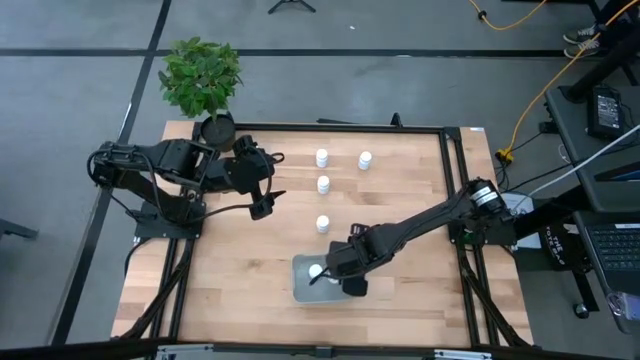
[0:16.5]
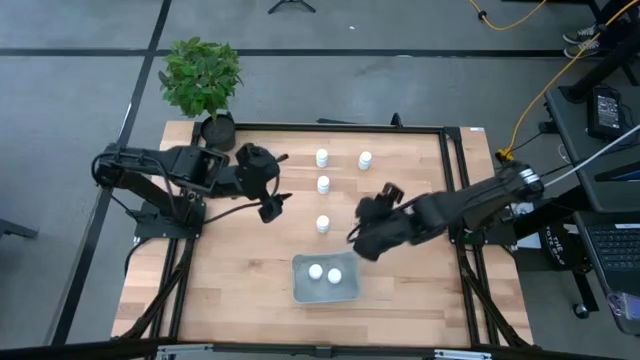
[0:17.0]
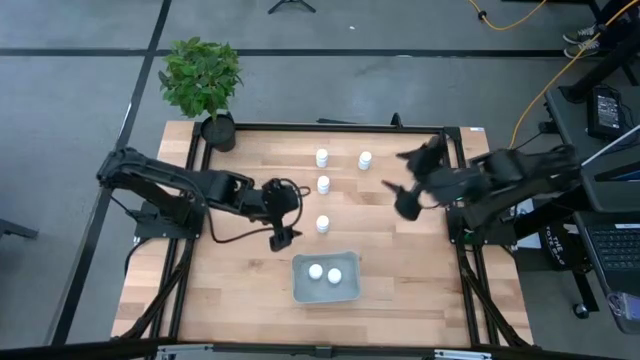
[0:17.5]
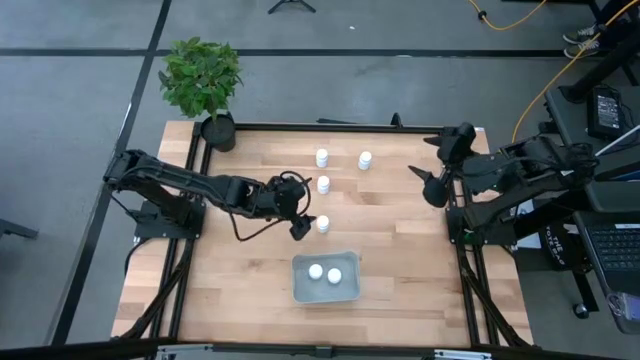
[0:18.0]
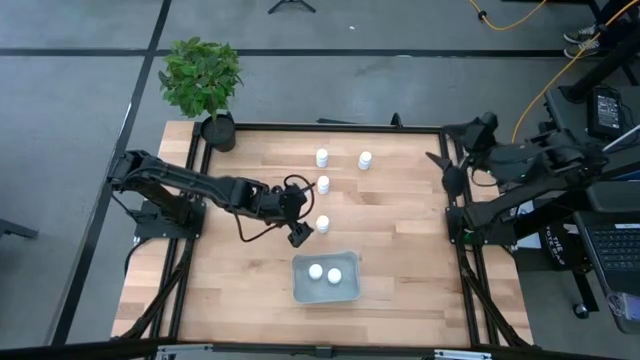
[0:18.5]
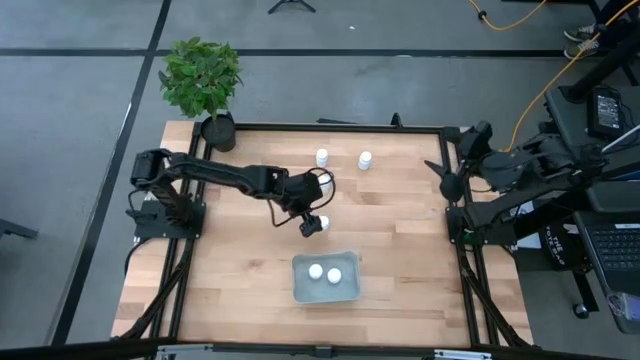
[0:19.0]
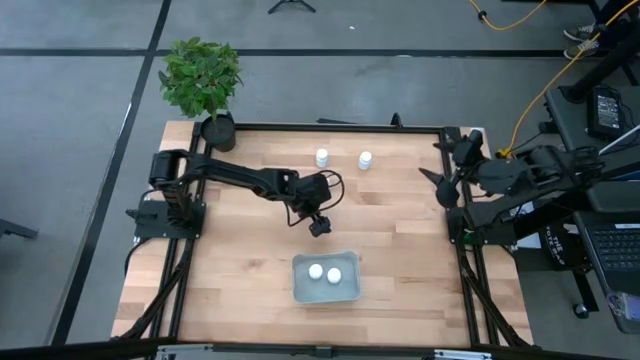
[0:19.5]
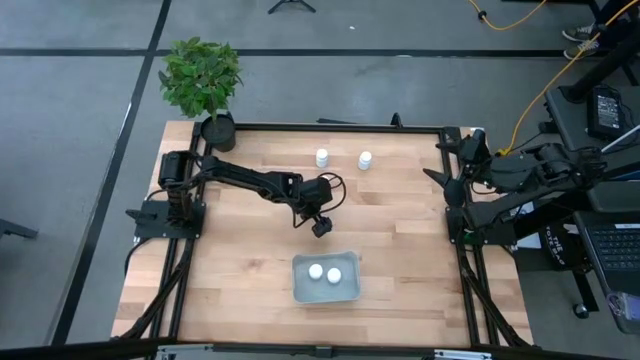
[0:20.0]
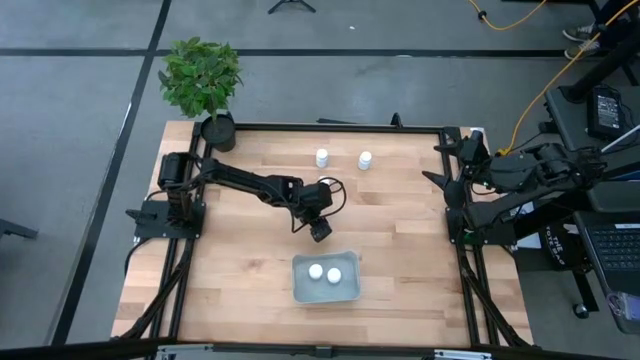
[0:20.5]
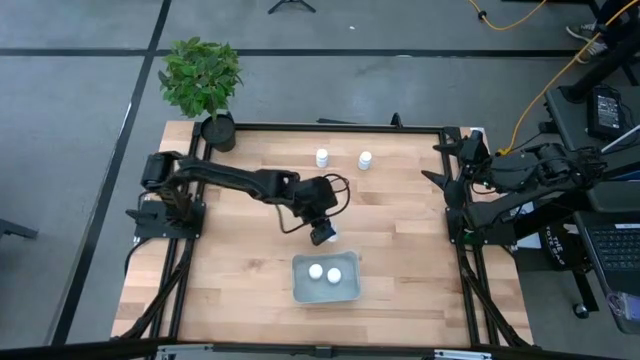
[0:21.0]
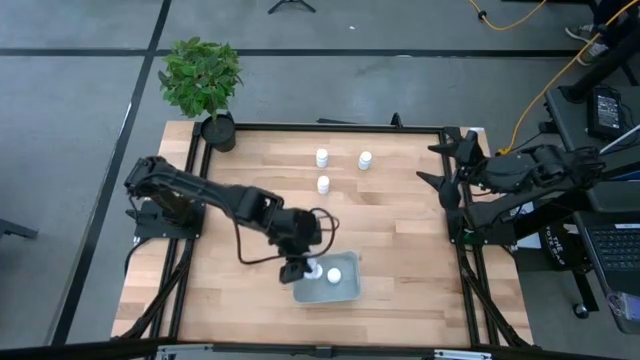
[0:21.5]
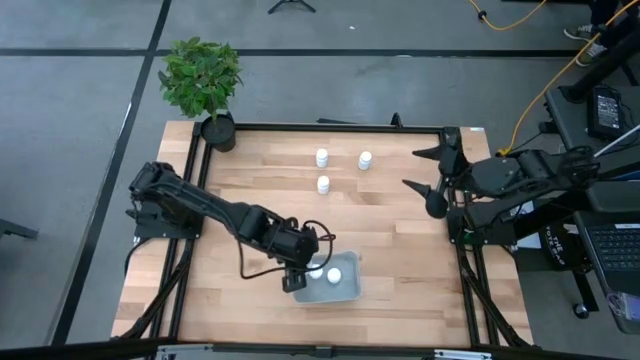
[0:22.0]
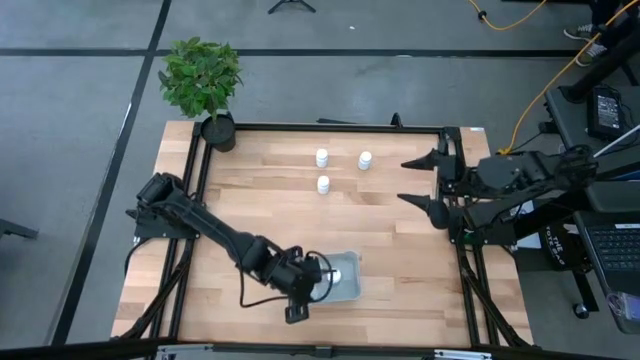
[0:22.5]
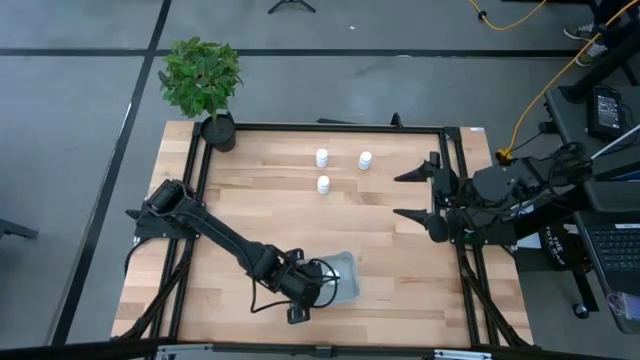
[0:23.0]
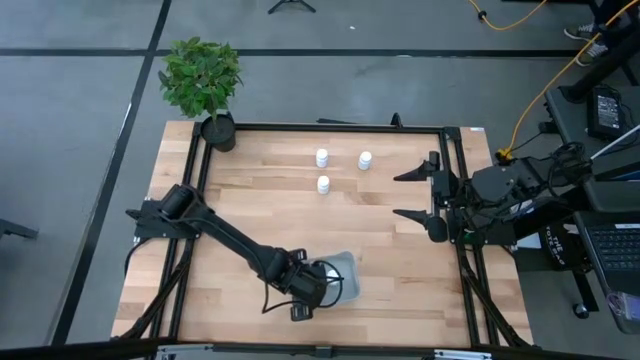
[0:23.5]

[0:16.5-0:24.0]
Task: Pick and place pill bottles into a basket
Put the white medicine bottle into the gray bin

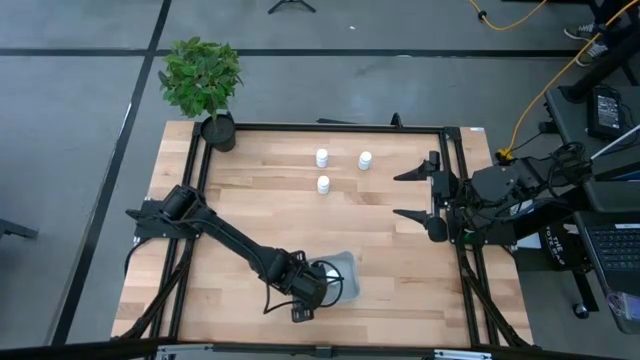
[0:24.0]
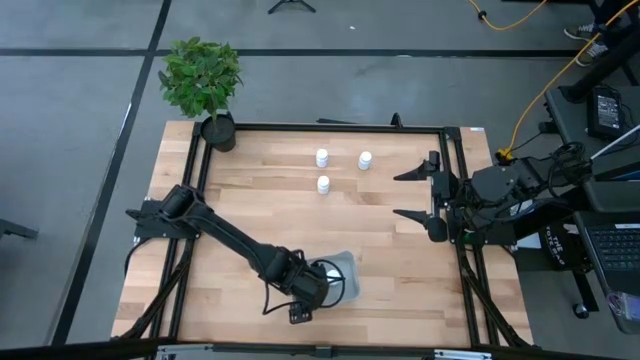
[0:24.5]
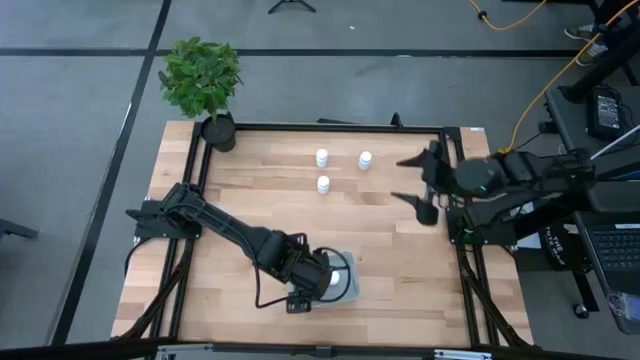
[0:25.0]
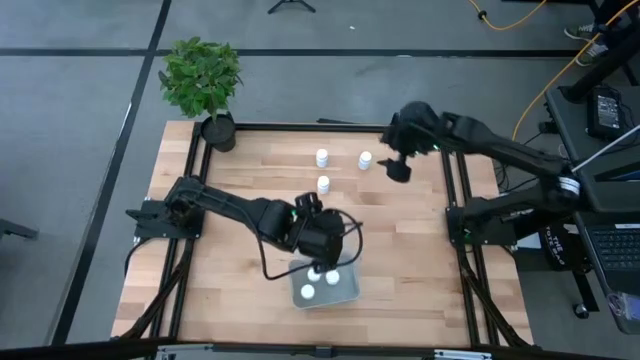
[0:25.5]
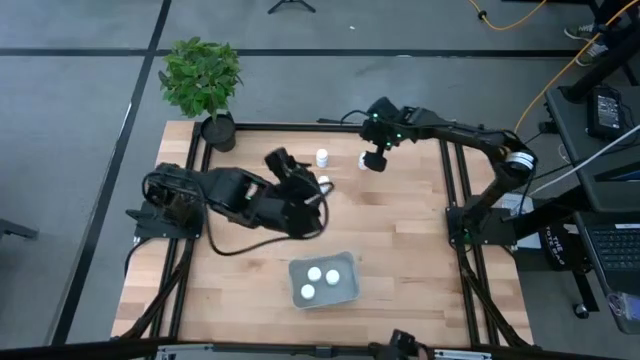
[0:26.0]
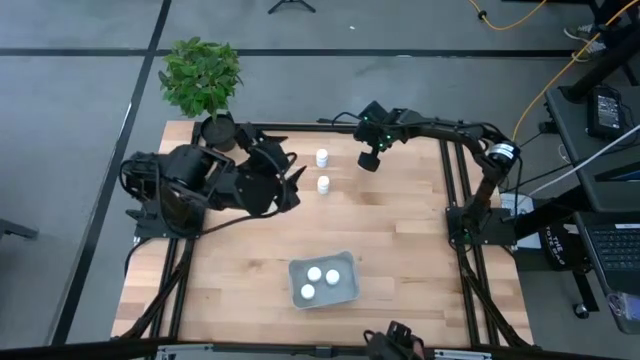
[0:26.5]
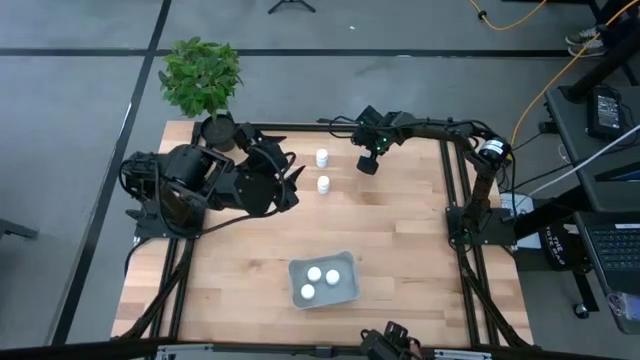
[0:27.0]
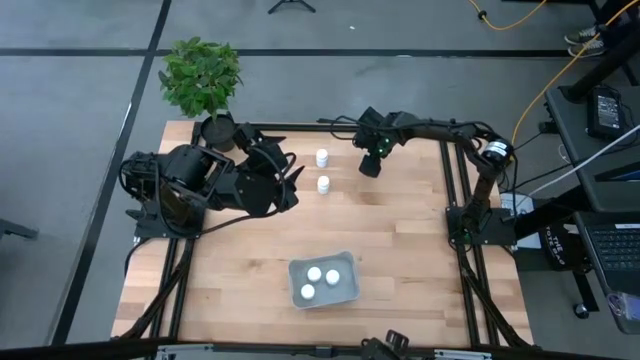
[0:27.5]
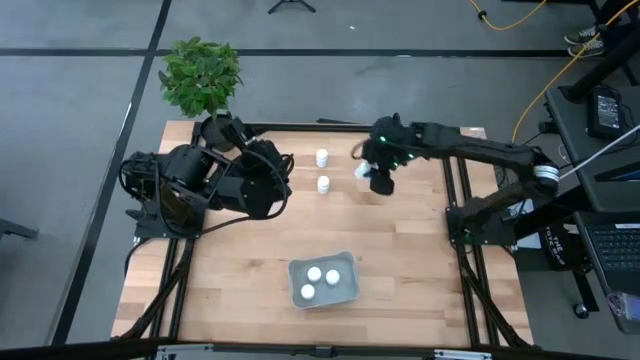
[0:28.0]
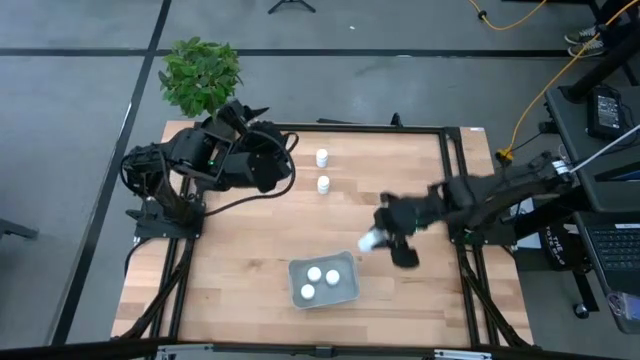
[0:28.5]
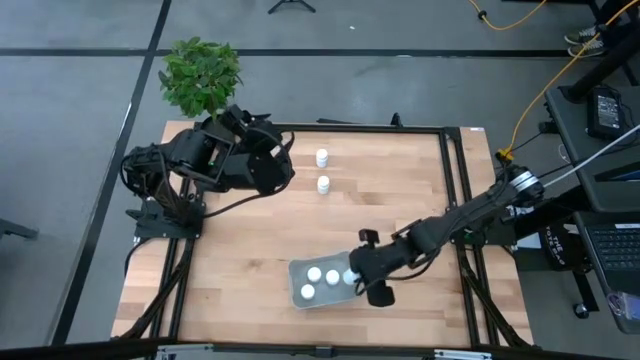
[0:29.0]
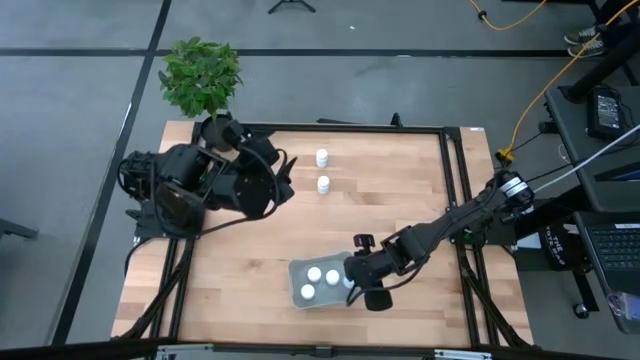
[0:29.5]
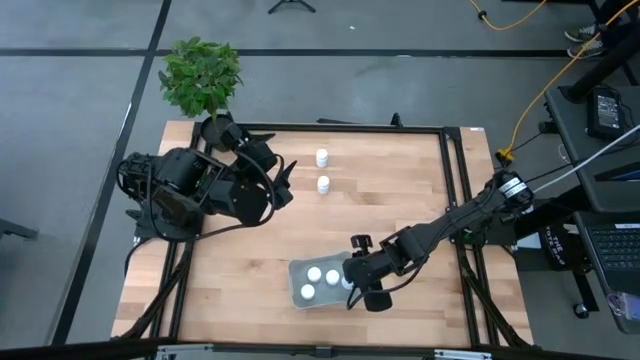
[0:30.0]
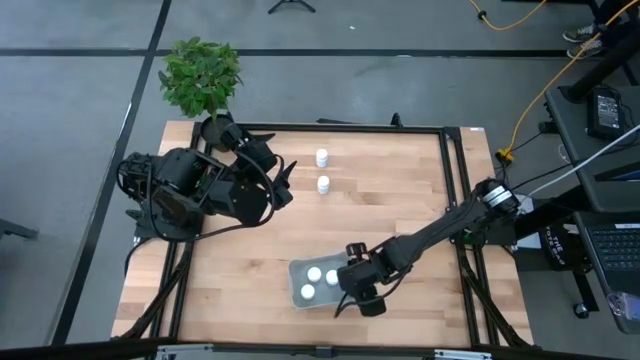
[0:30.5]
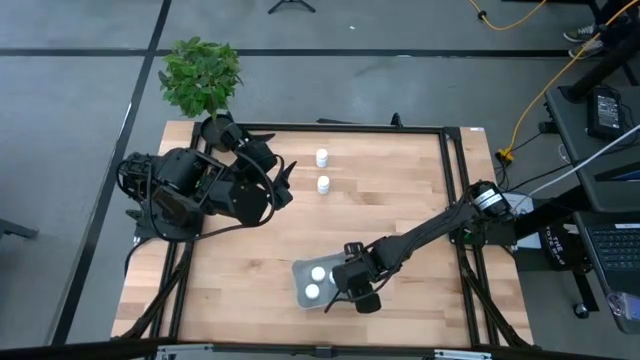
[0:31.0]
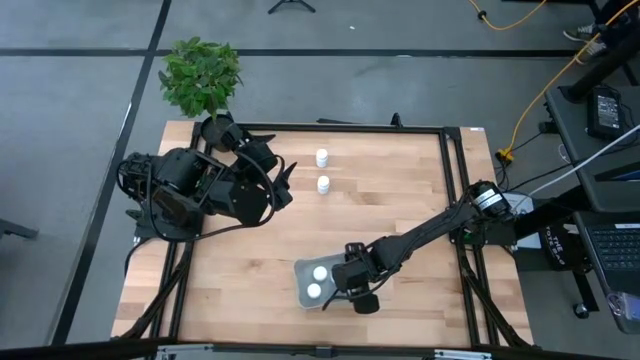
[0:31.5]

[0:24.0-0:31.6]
Put the white medicine bottle into the gray bin

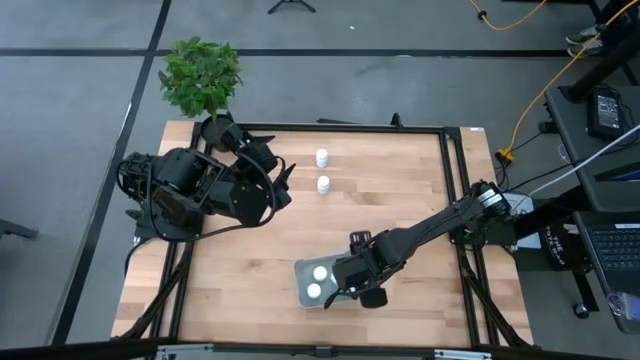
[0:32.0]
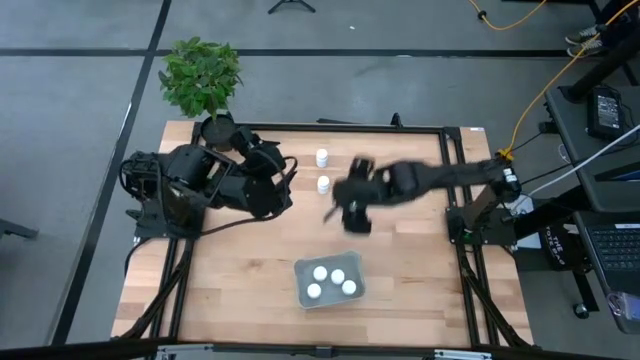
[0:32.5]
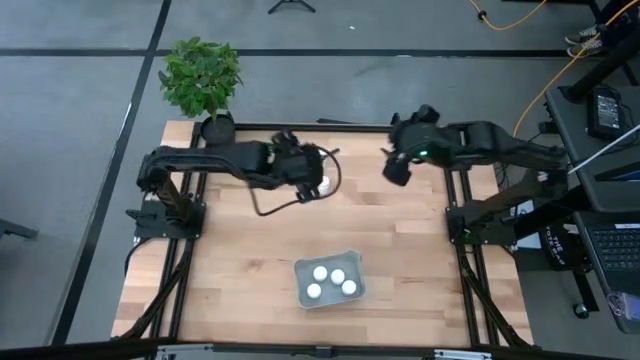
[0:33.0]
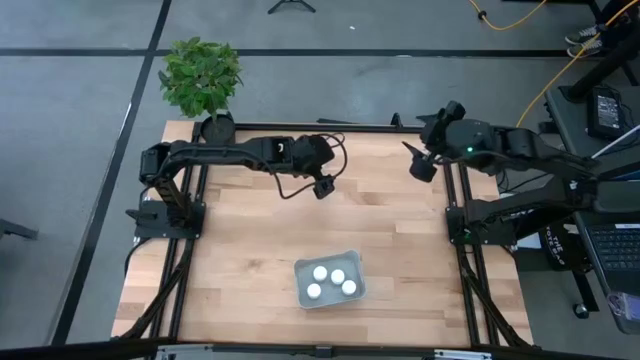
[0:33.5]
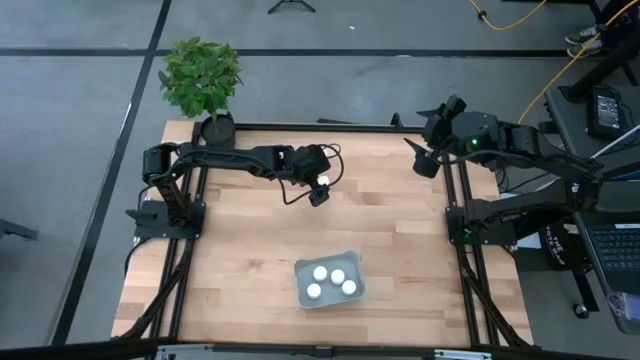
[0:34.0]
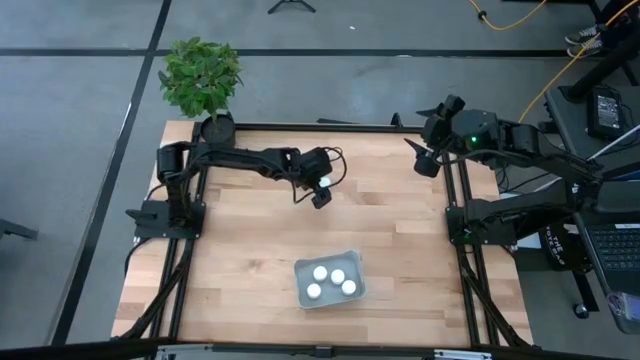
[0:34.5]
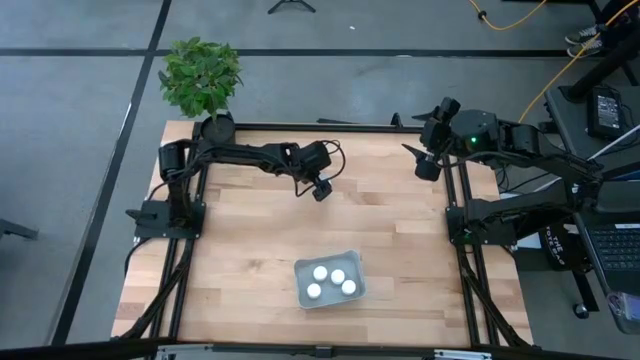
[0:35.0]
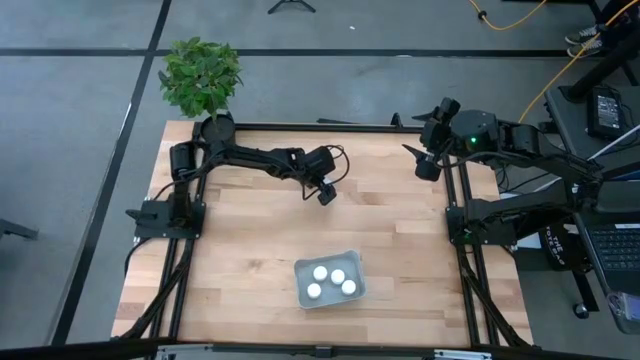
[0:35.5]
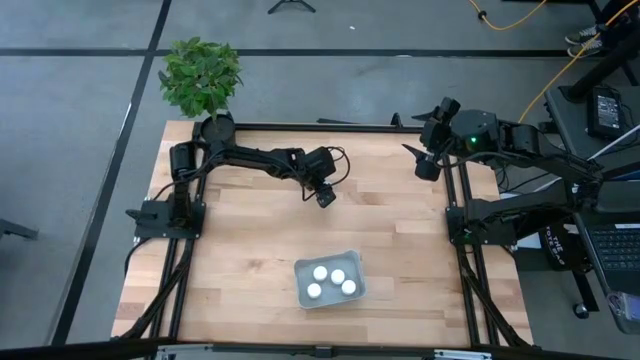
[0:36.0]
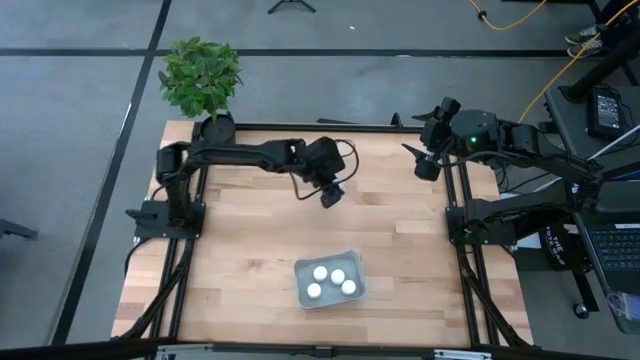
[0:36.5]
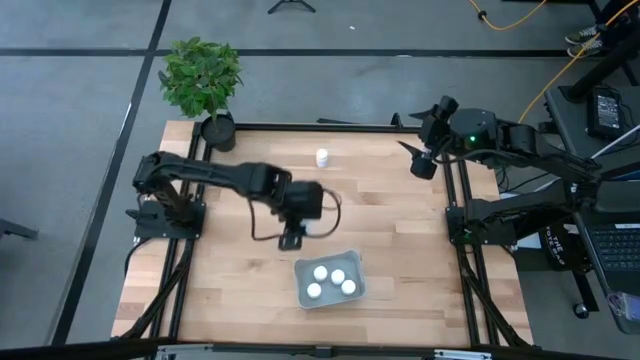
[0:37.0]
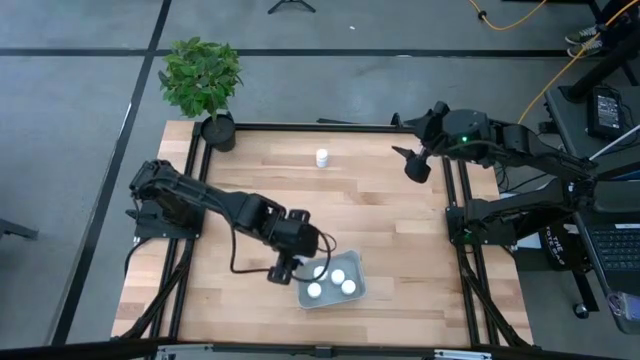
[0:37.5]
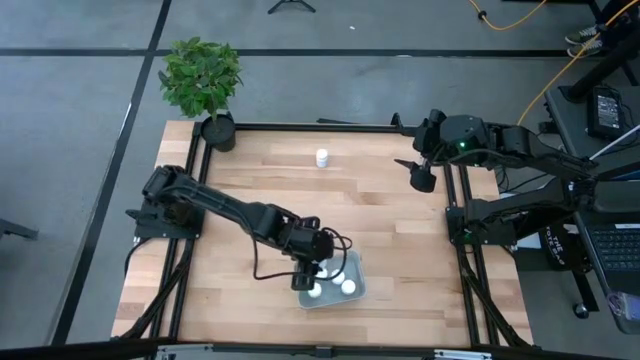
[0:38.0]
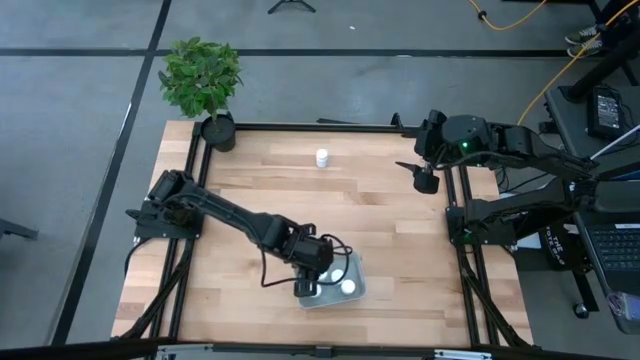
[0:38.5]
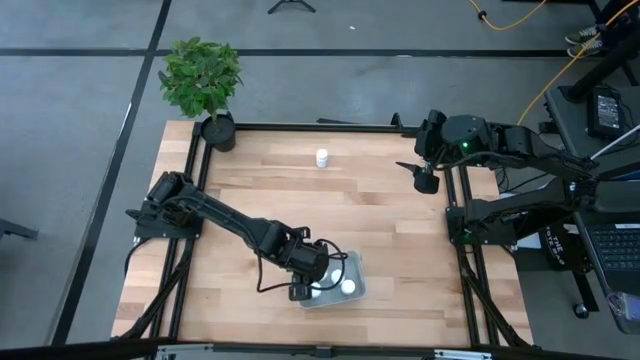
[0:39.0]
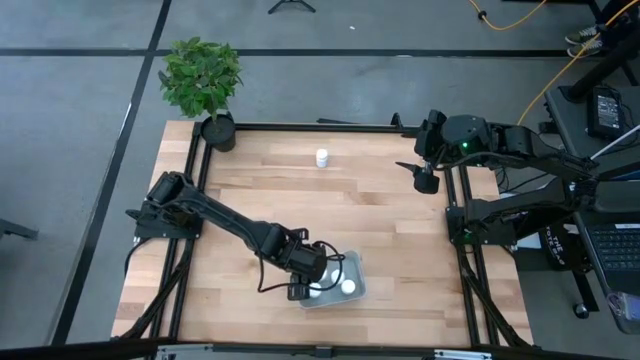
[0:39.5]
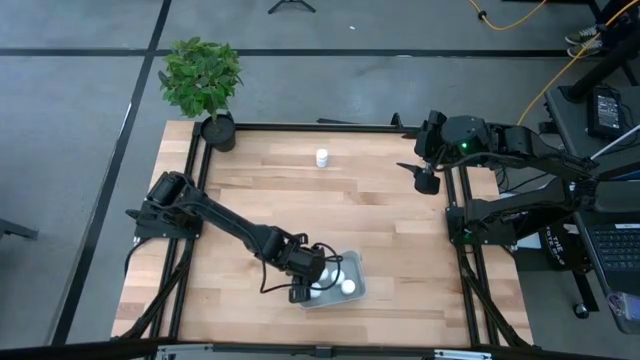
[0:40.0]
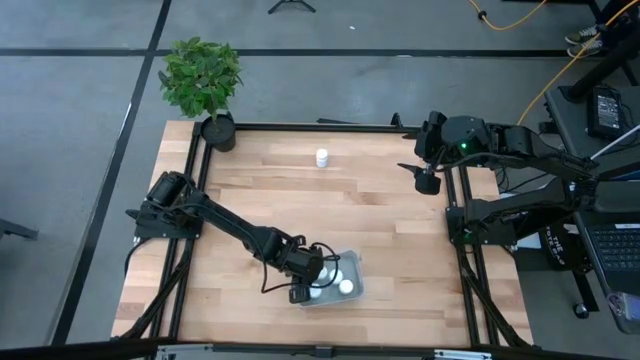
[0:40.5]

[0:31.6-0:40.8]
Put the white medicine bottle into the gray bin
